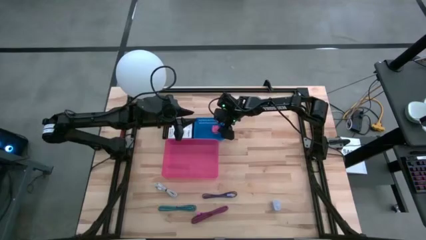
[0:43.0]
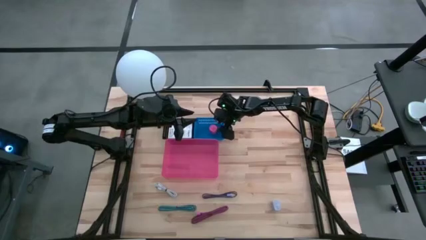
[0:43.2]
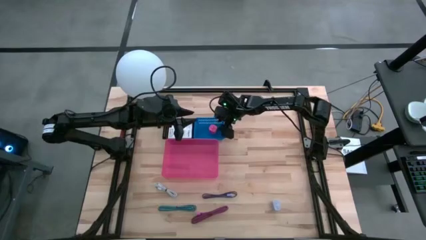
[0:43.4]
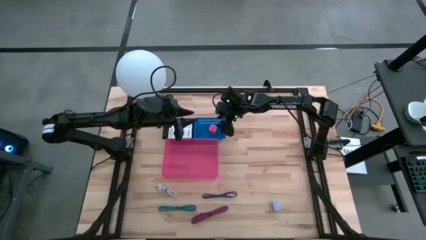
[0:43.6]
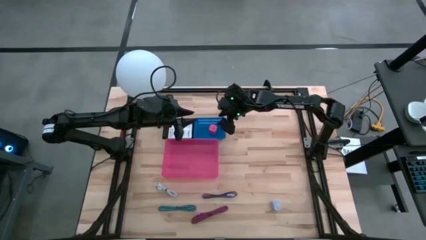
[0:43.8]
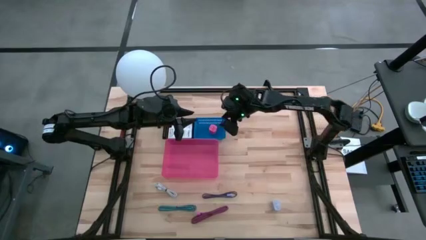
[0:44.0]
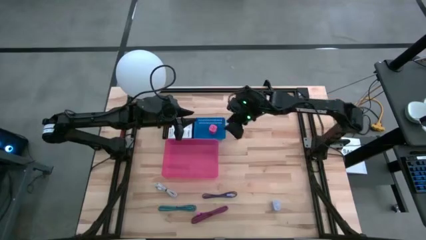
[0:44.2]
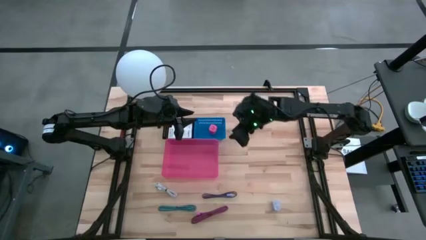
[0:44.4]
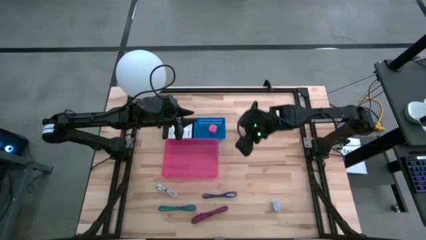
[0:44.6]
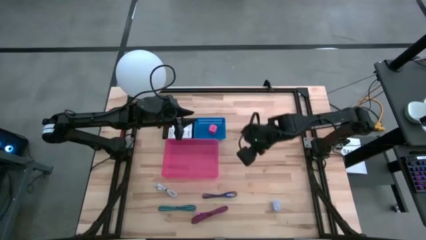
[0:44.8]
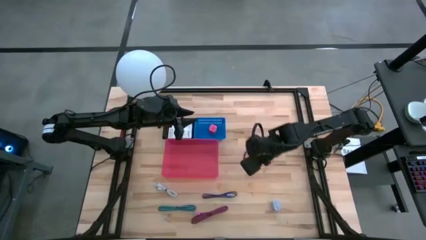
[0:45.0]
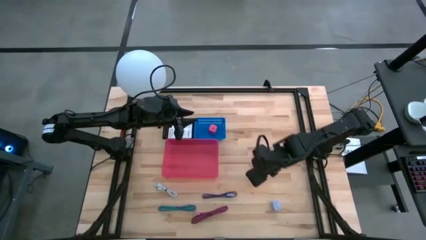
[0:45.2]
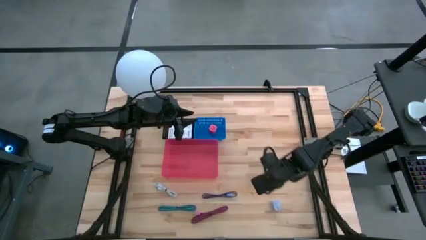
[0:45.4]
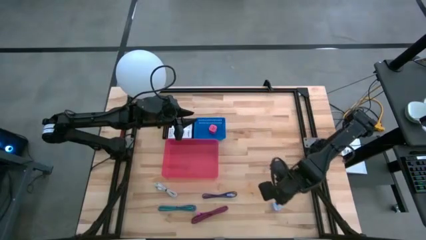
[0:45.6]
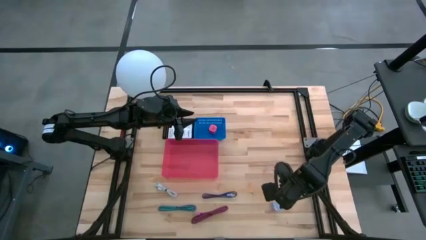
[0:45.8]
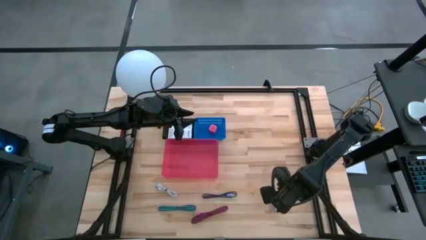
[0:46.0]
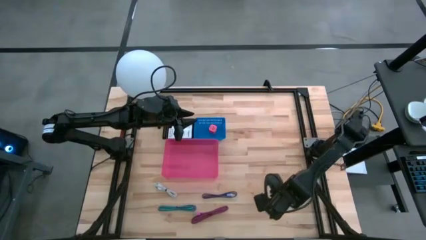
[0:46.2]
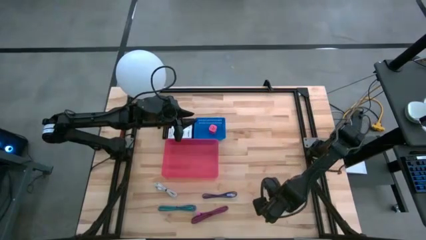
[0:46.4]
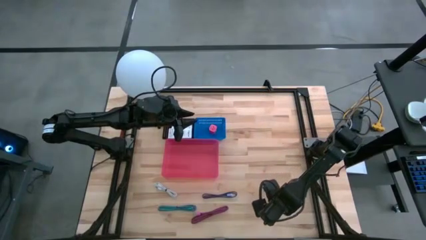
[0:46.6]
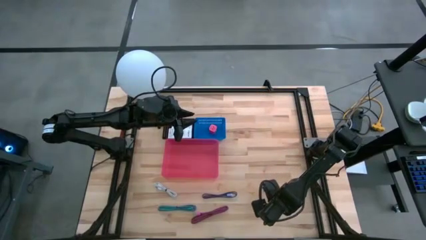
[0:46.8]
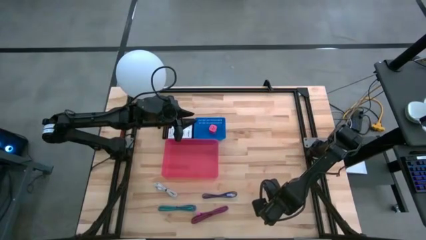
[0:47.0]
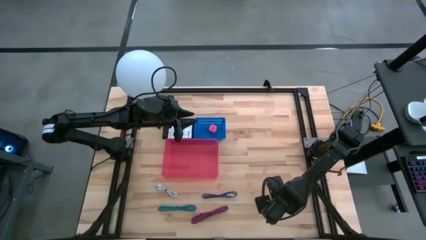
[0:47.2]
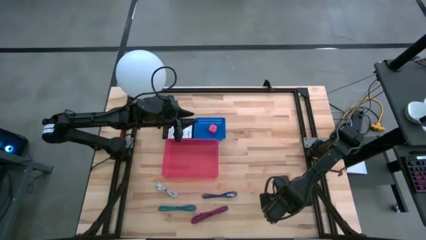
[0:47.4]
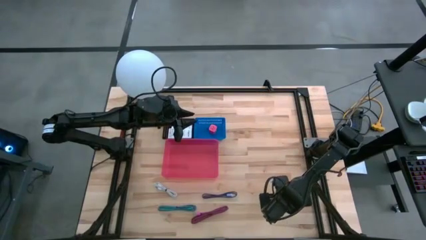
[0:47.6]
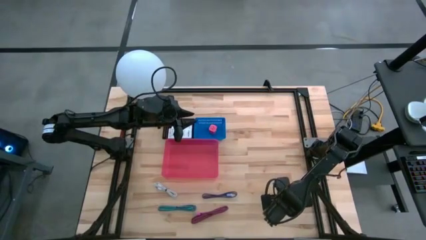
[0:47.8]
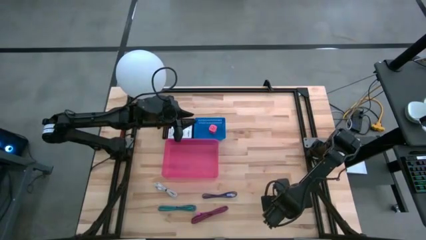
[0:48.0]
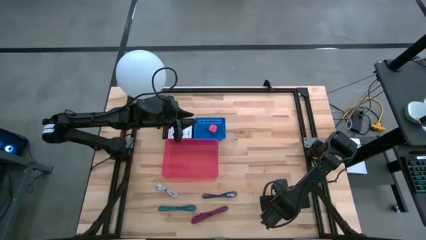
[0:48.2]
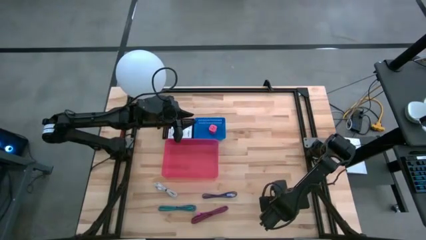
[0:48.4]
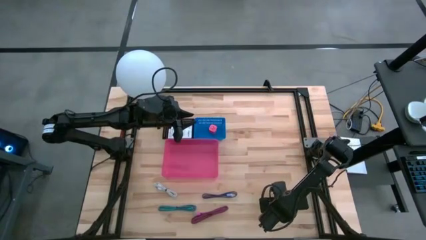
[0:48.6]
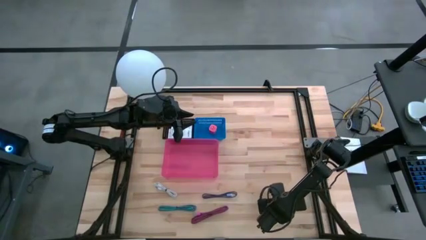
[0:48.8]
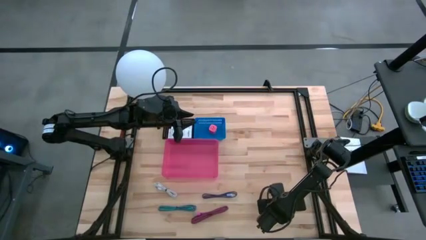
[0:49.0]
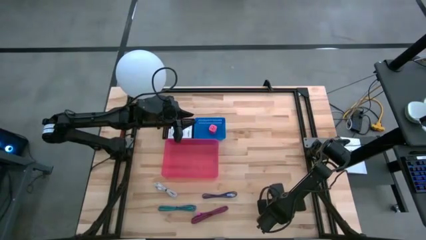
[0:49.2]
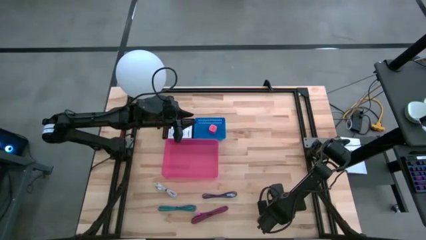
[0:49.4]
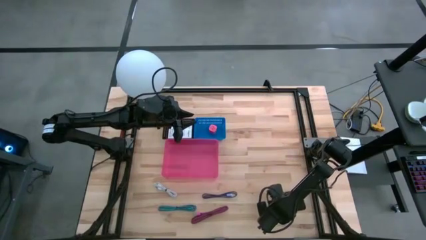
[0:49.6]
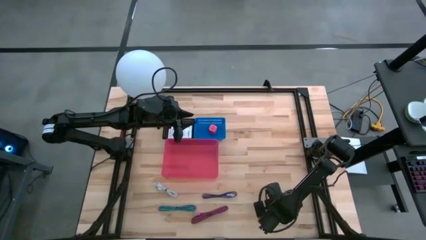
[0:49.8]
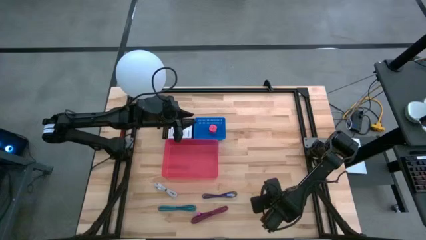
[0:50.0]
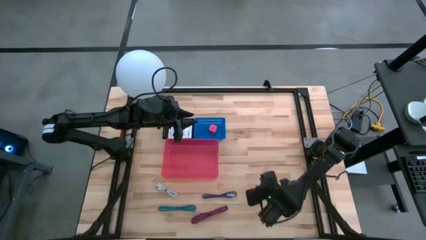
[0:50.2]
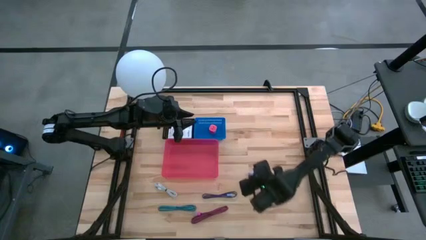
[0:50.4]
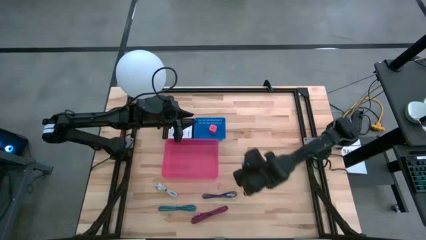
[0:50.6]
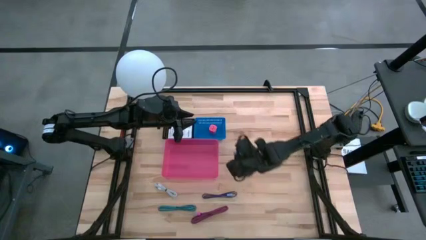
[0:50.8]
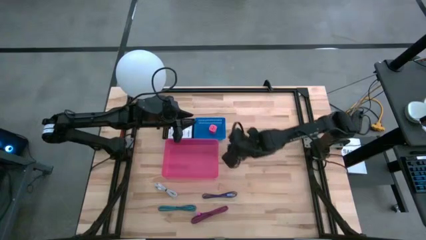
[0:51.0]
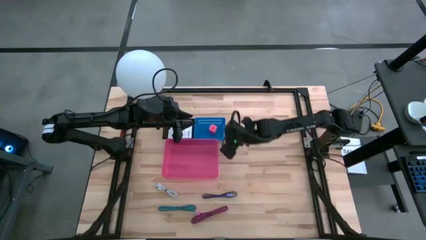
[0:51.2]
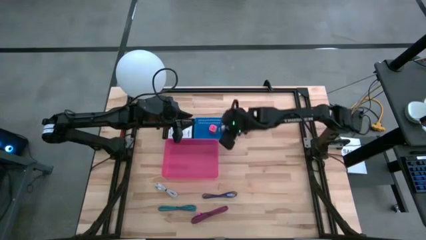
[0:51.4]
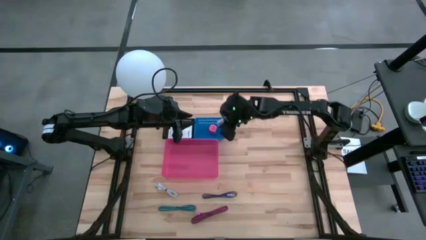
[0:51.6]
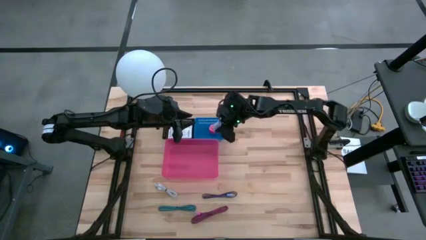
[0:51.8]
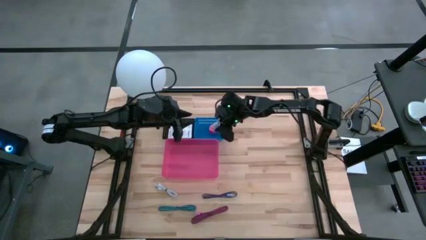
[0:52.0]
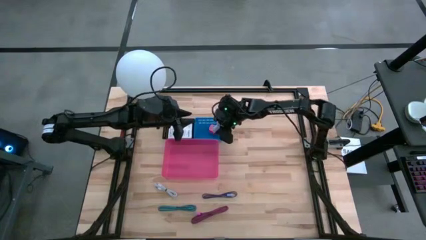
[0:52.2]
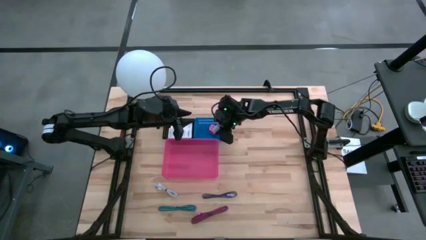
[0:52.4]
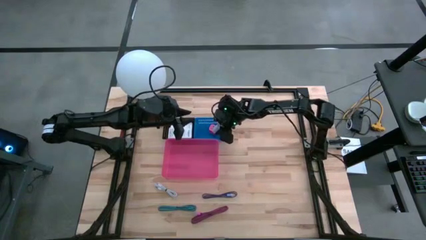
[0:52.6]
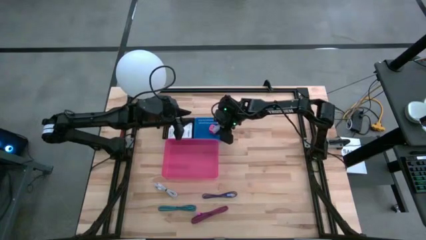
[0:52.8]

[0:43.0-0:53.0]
Task: Pick and place items into bin
Put the white charger adapter into the blue bin

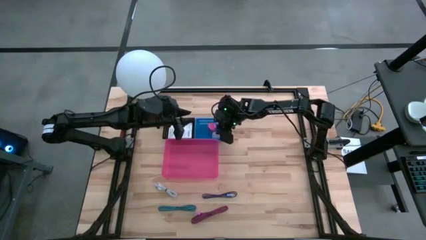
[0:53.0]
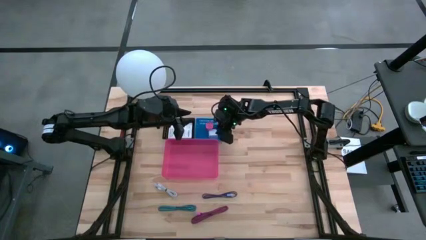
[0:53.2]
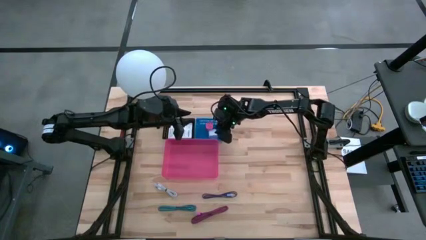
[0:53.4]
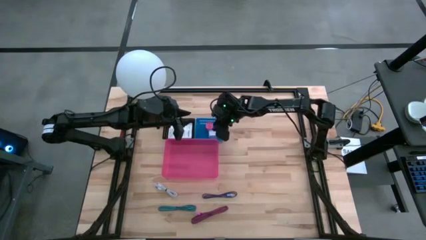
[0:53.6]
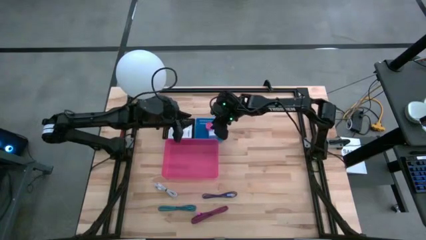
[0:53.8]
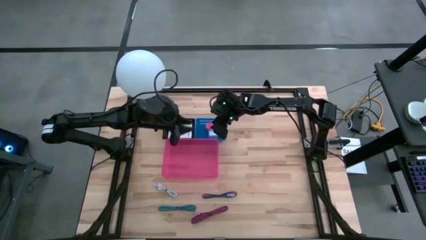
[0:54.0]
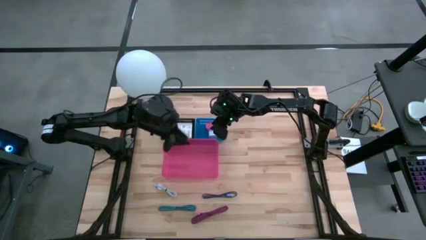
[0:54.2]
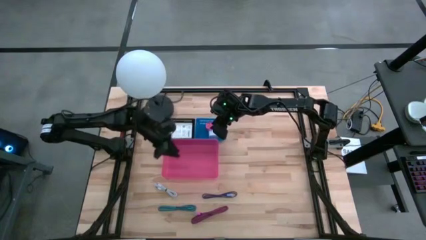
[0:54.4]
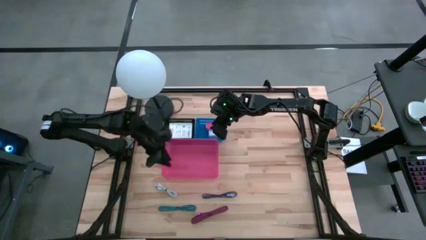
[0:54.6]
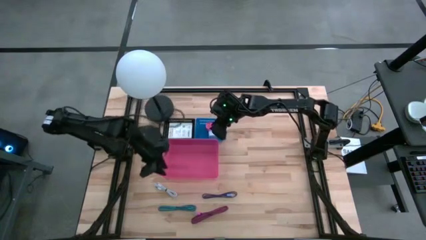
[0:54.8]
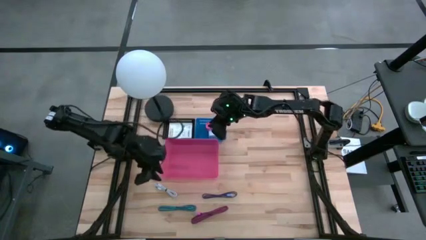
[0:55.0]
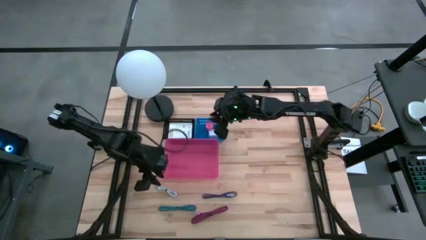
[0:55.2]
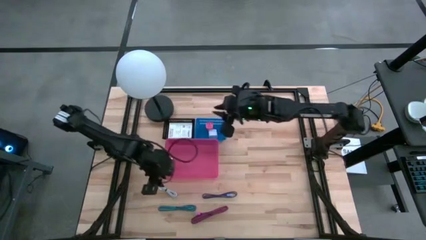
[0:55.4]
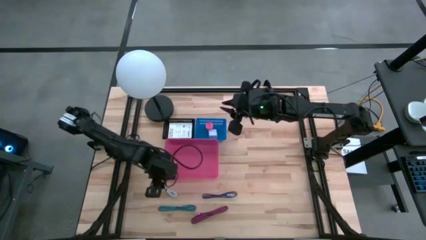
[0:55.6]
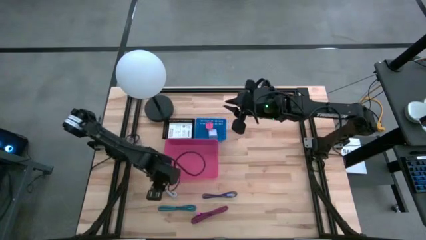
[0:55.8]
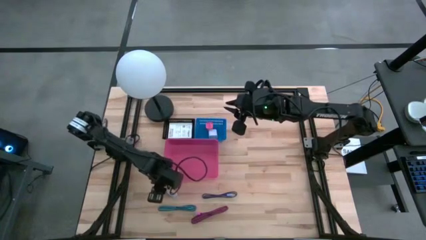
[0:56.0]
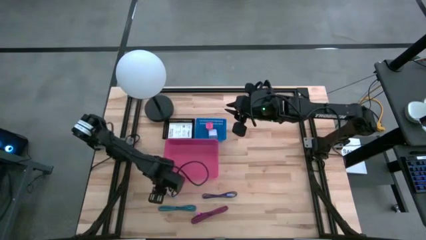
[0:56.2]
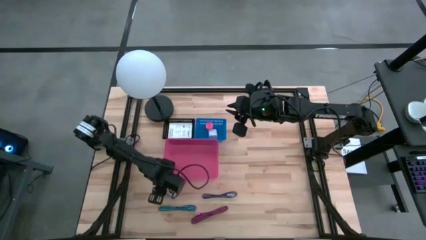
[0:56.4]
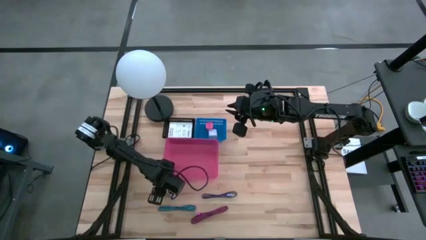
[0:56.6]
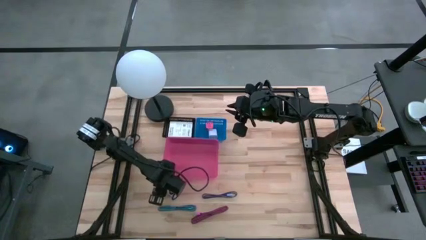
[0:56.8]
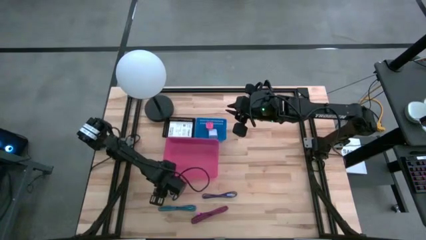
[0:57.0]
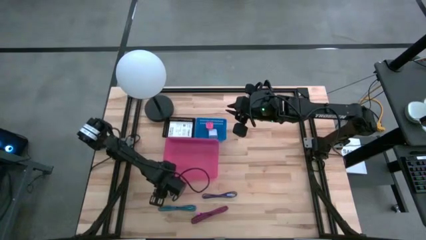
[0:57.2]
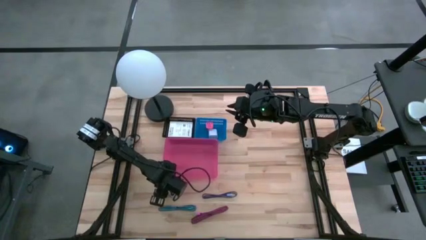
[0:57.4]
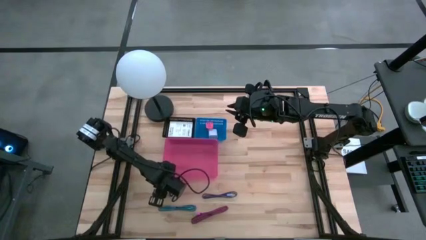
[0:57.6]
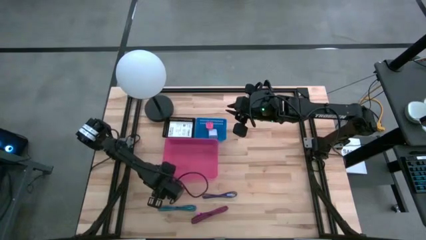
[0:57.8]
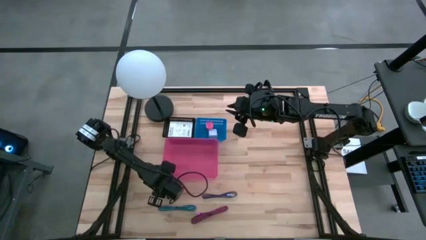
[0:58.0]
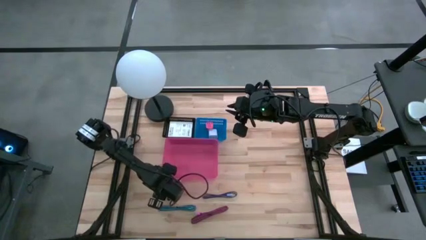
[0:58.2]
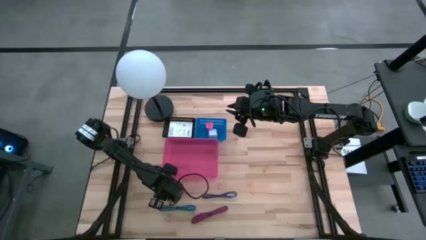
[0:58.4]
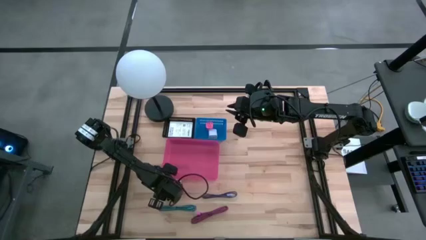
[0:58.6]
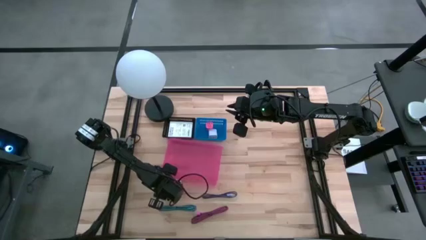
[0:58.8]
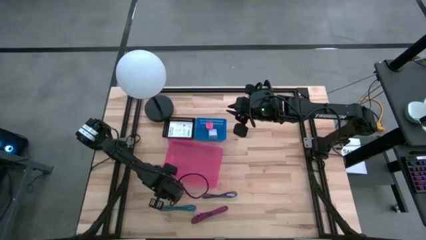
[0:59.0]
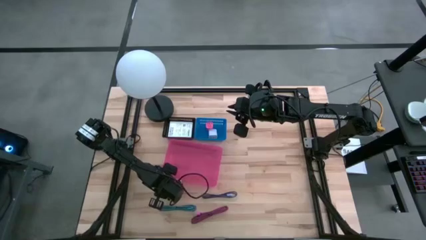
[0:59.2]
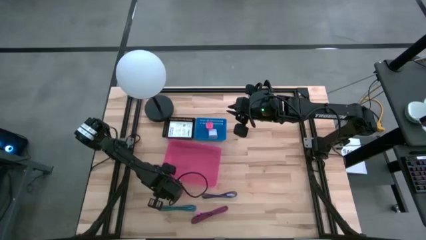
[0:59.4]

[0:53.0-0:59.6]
Put the white charger cable into the pink bin

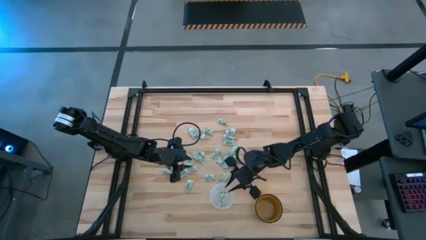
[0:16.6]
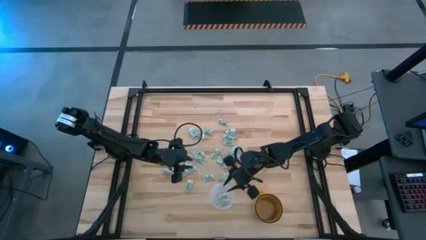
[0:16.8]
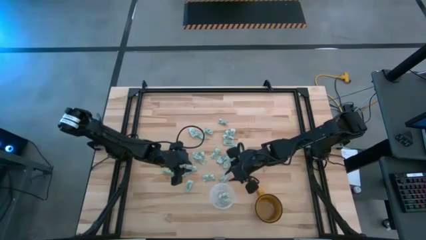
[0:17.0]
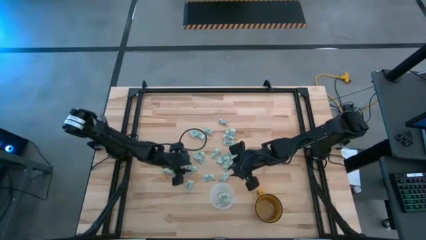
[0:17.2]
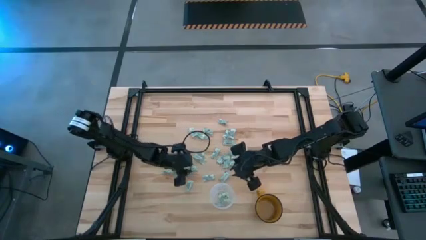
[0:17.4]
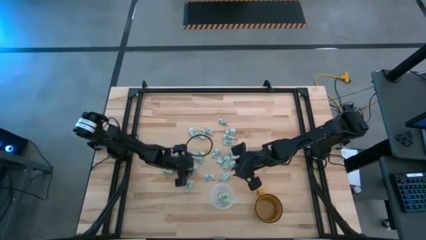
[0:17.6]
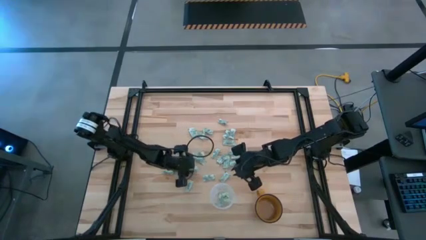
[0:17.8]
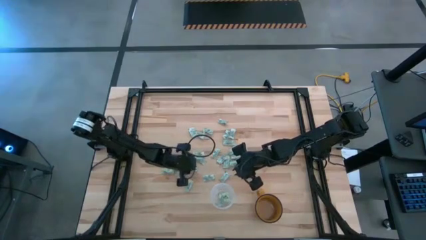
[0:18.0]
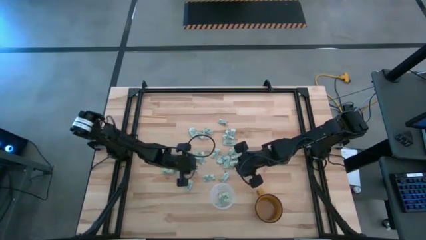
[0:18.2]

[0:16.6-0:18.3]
Task: Pick and place Stevia / Truvia into bins
Put the stevia packet into the transparent bin
